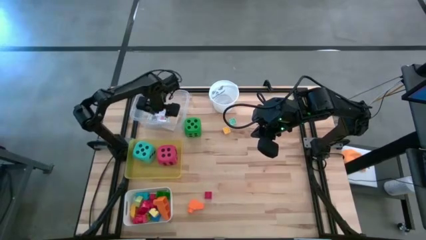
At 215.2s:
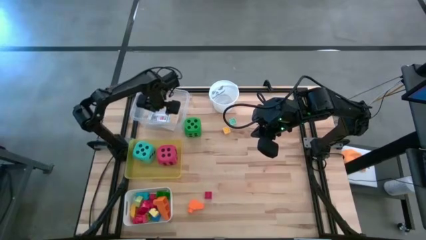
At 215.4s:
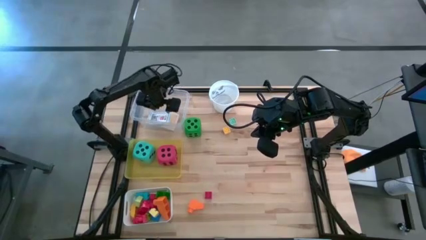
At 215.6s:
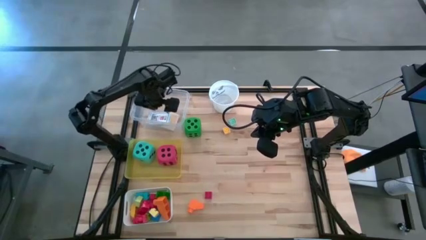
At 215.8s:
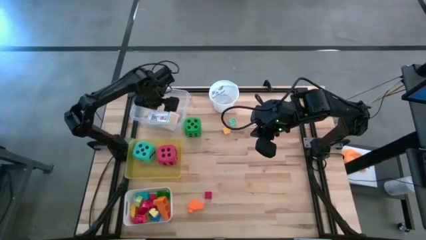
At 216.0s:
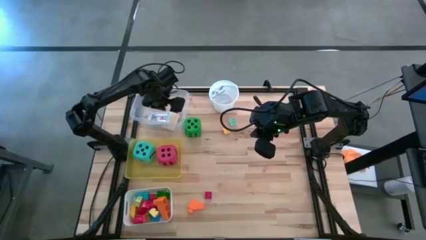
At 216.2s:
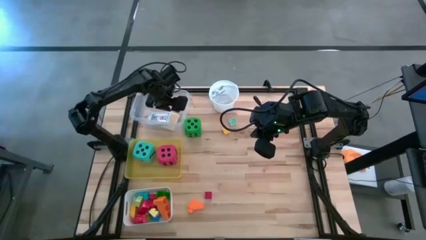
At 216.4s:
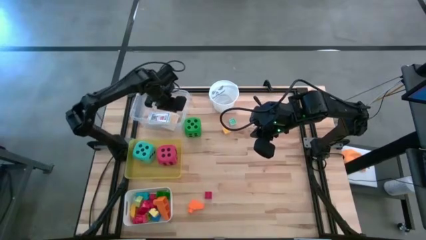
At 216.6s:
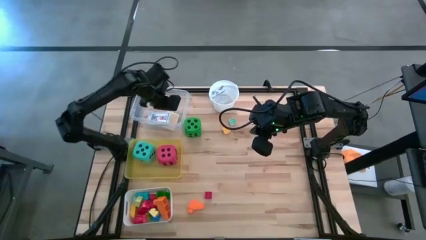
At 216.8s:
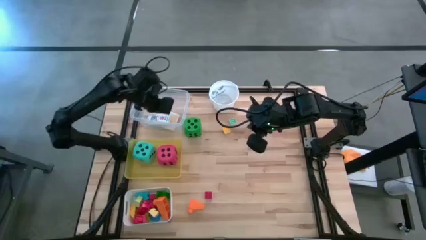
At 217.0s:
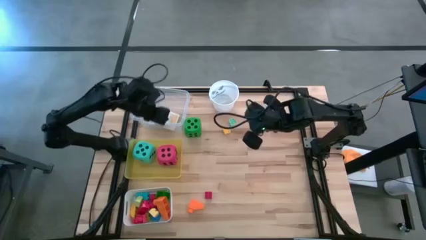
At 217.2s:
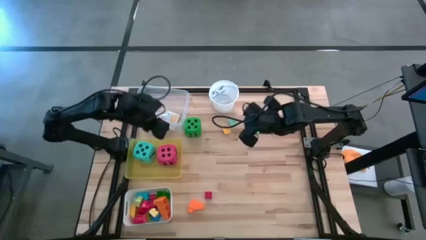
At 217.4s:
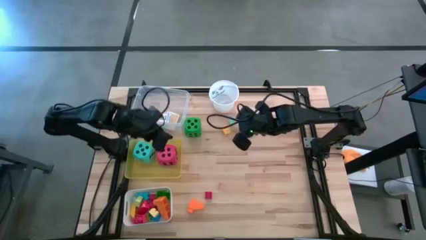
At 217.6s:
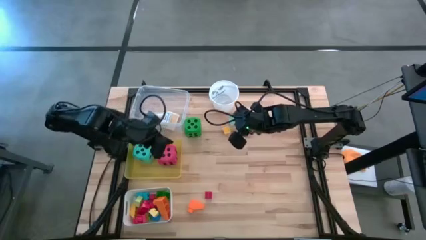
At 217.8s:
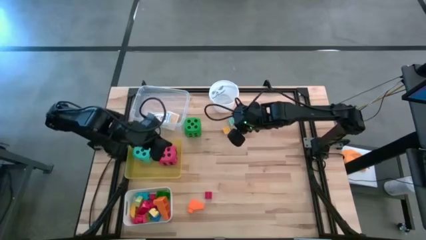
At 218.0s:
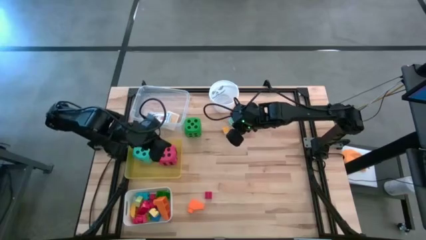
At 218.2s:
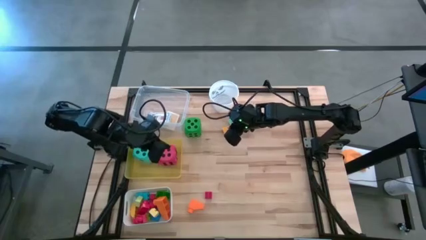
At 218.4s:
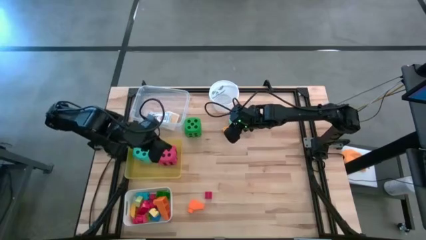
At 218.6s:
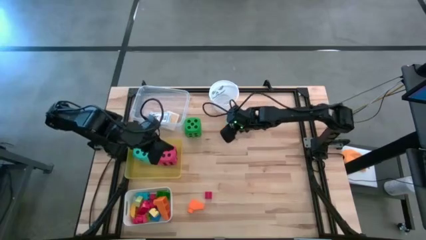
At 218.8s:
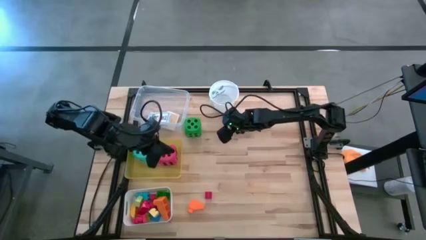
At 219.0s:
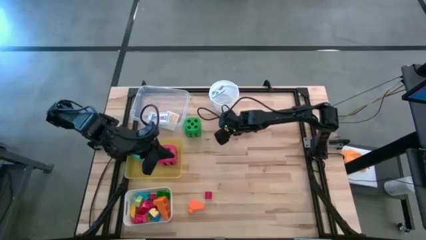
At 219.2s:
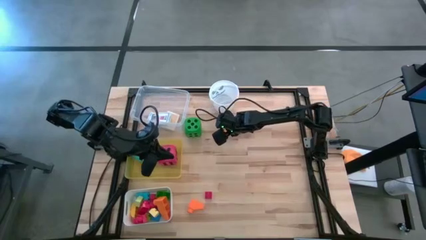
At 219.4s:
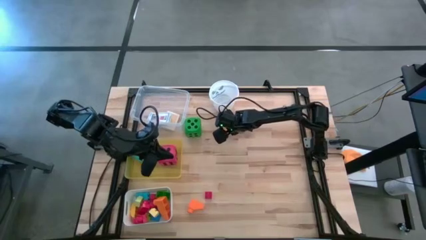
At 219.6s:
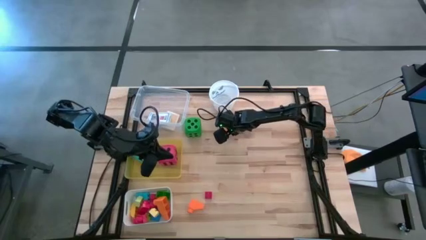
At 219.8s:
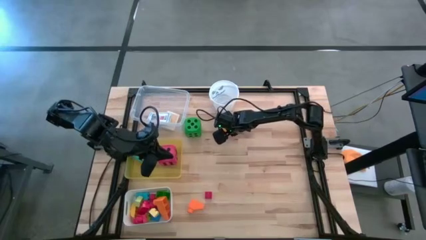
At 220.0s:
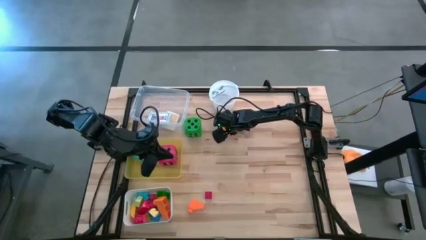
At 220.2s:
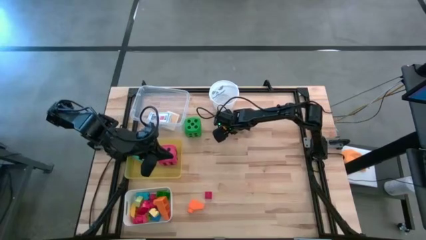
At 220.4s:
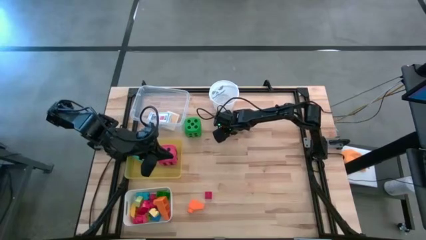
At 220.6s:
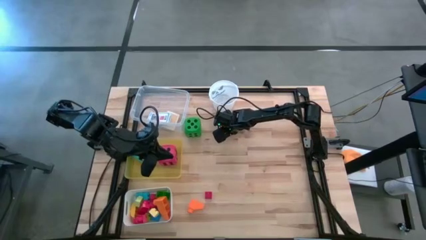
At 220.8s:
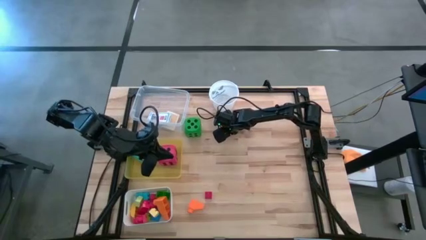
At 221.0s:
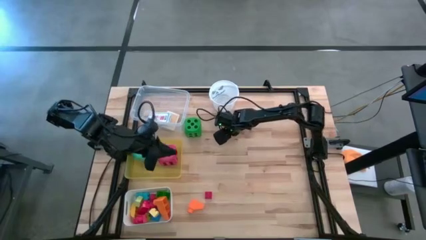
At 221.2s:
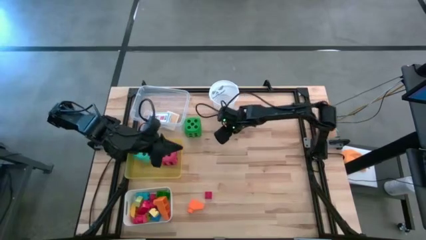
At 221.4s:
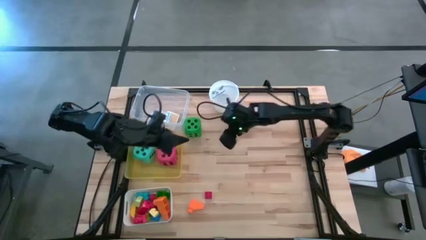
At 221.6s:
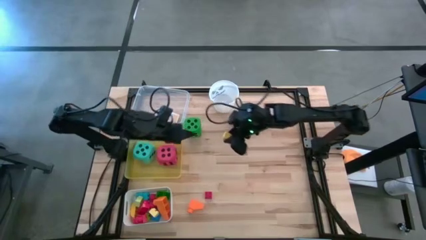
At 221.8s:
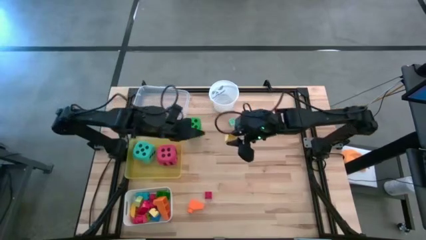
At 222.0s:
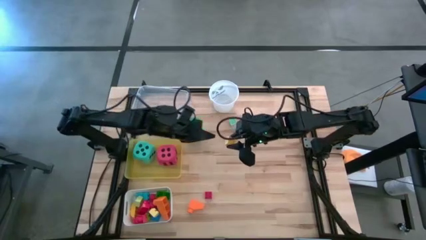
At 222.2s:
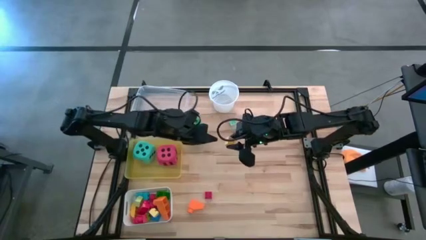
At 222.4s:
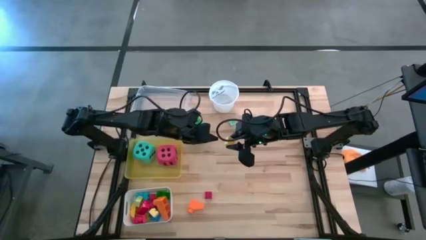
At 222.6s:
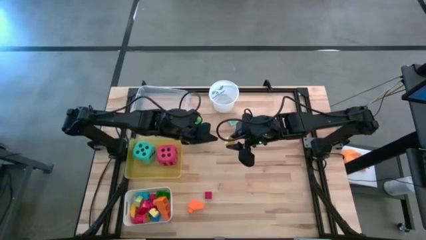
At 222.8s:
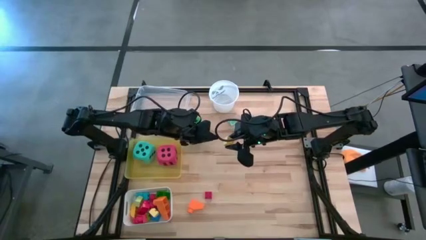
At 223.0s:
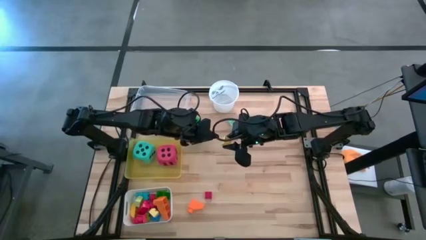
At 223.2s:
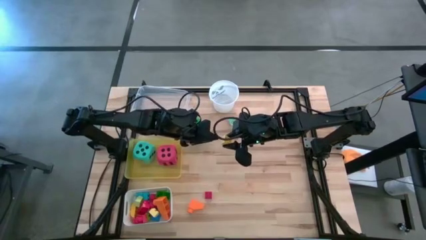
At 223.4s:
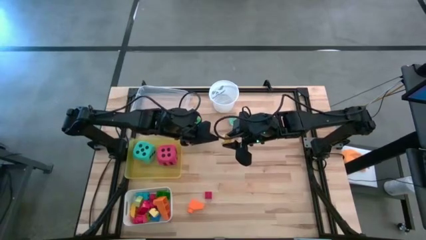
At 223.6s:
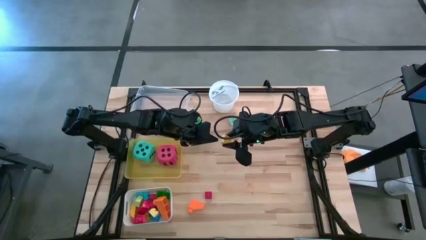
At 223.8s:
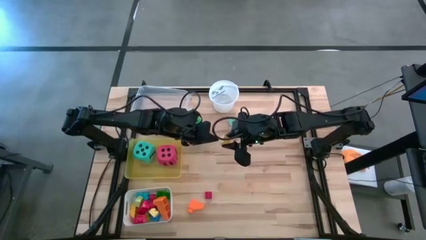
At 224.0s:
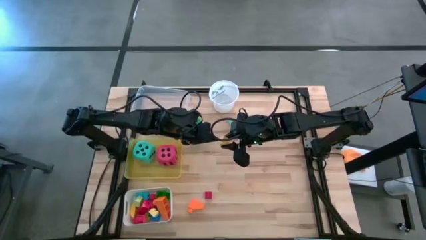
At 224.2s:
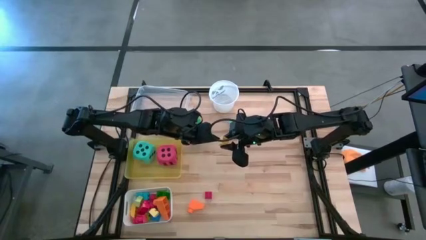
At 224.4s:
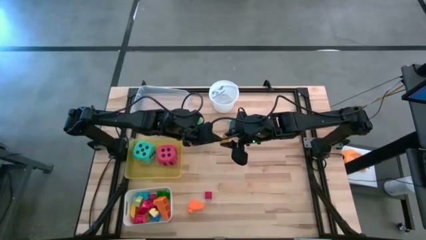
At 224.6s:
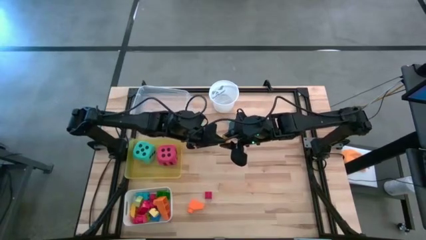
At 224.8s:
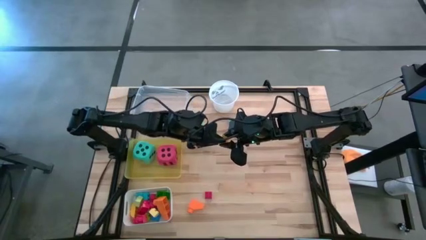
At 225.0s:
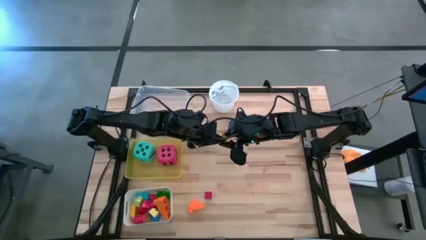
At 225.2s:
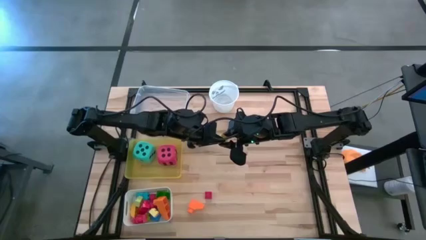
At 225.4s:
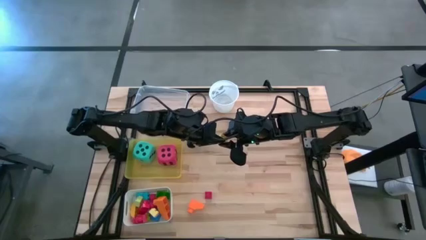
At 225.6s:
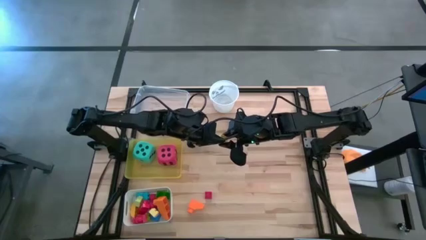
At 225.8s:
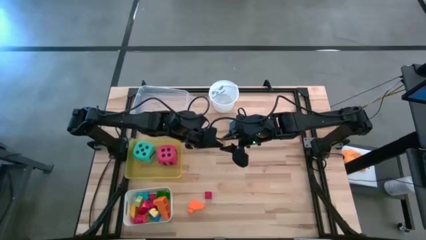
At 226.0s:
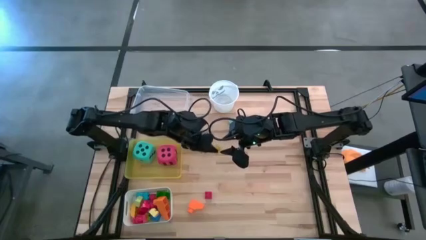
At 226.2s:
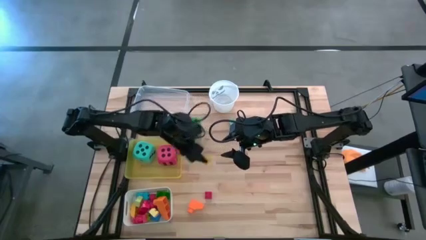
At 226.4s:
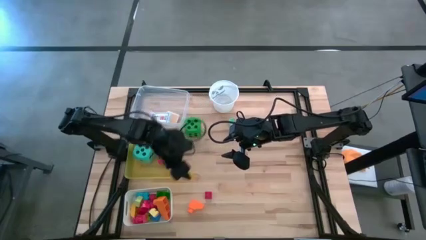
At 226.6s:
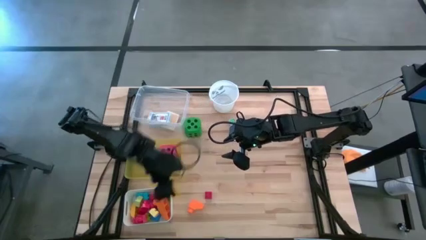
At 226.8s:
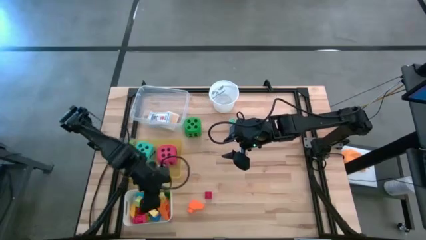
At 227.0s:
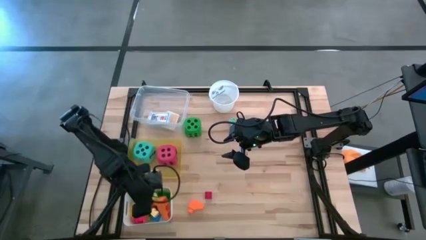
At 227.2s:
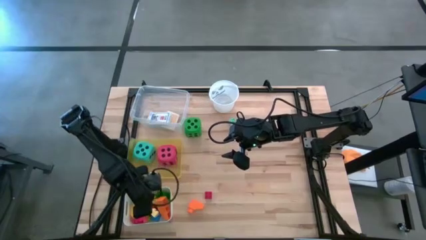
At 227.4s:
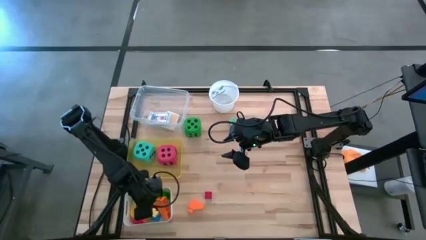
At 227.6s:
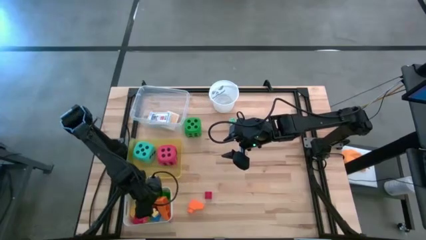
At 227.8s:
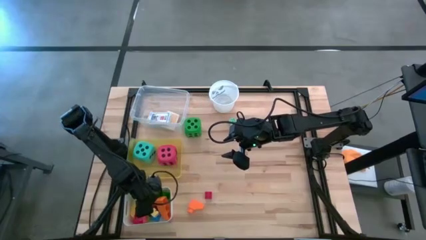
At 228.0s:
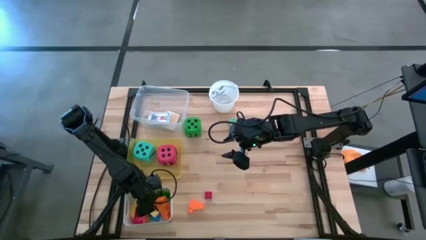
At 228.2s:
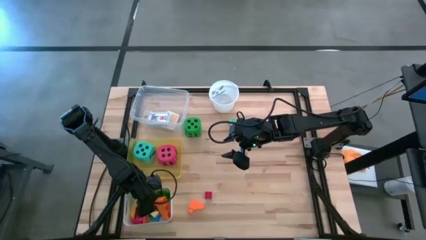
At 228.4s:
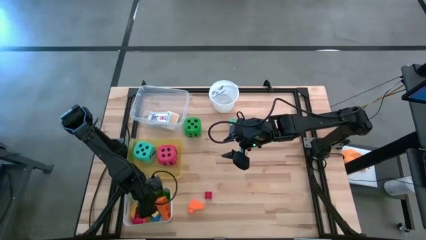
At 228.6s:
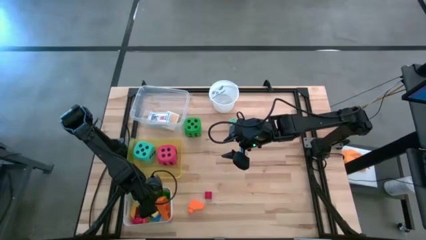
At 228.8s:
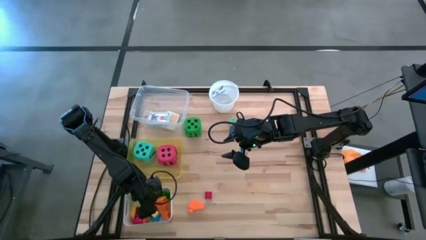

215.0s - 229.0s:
Task: Pick & Place Toys
Put the yellow game piece into the white bin

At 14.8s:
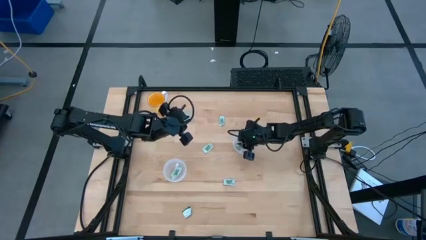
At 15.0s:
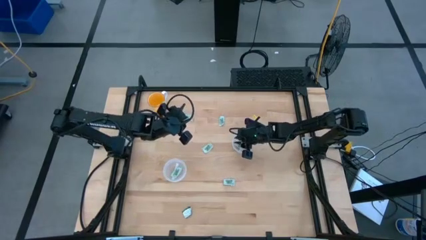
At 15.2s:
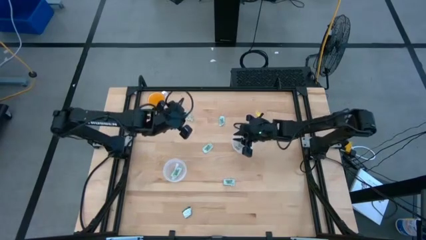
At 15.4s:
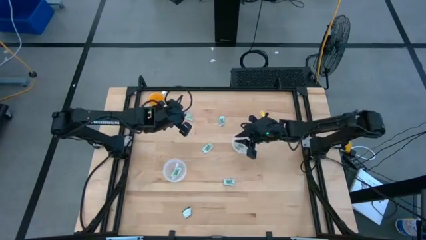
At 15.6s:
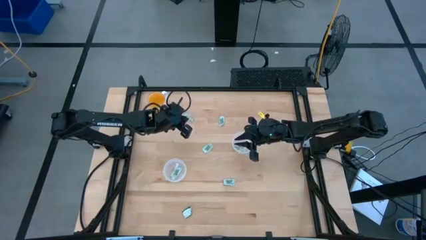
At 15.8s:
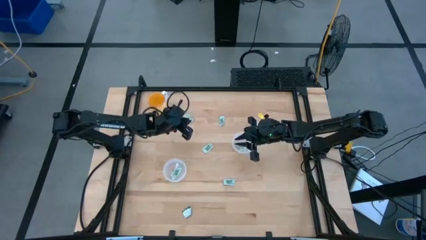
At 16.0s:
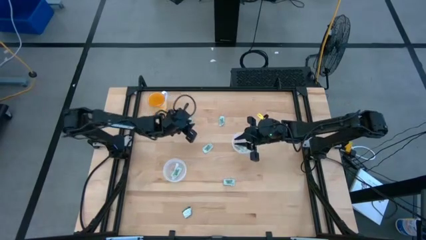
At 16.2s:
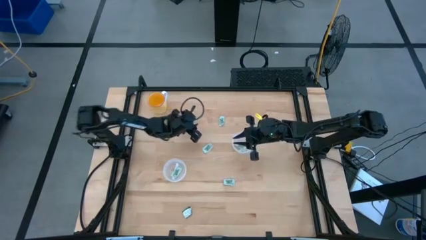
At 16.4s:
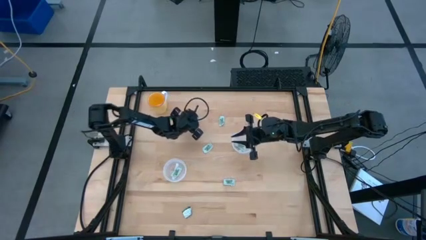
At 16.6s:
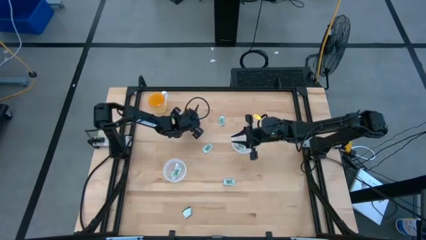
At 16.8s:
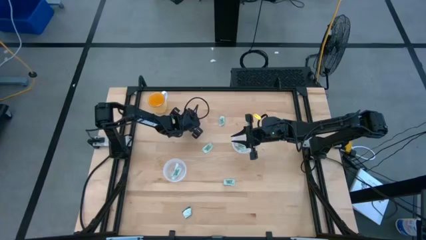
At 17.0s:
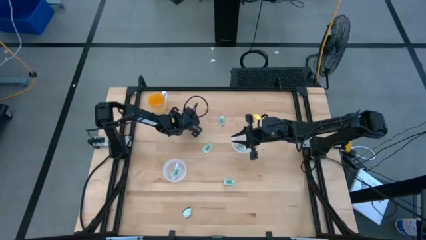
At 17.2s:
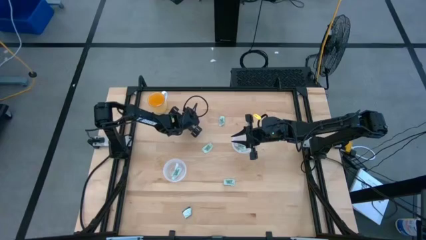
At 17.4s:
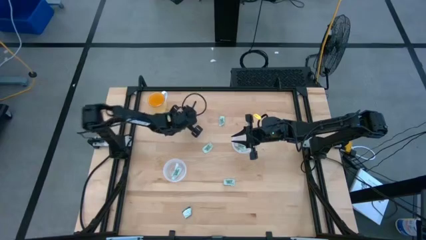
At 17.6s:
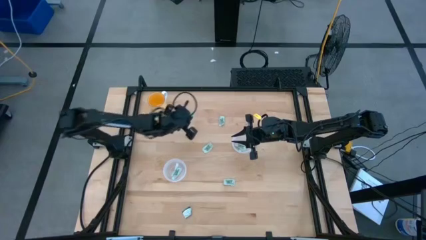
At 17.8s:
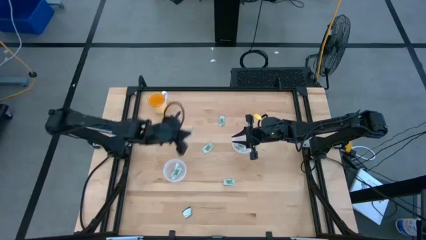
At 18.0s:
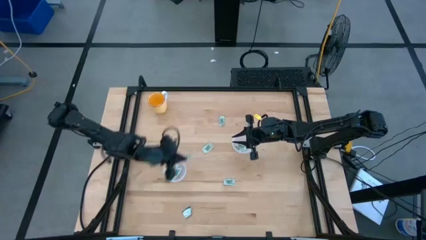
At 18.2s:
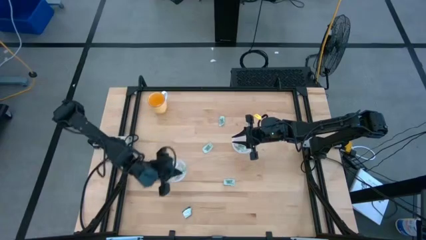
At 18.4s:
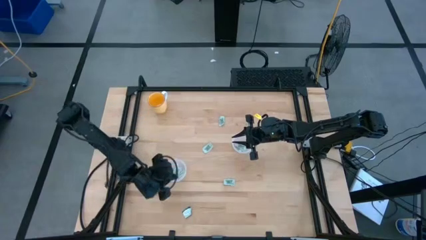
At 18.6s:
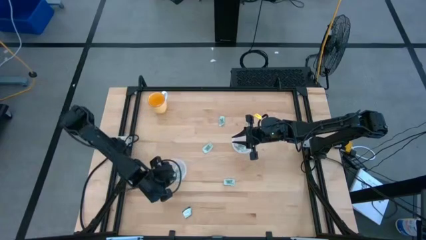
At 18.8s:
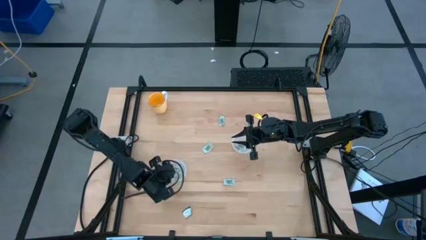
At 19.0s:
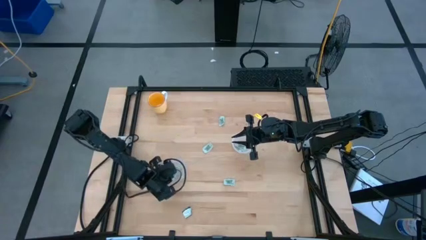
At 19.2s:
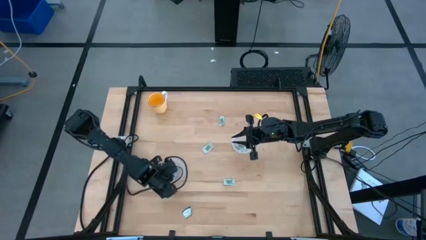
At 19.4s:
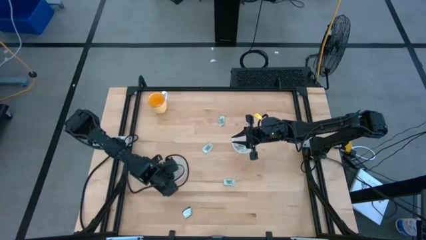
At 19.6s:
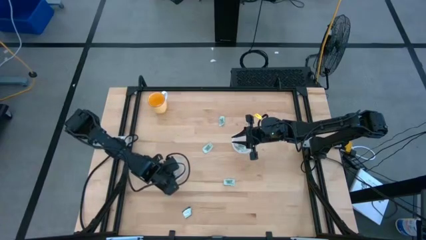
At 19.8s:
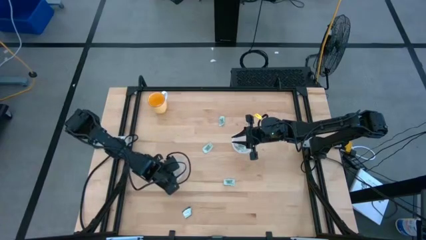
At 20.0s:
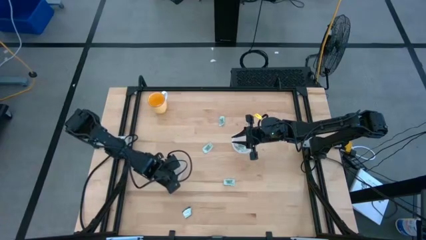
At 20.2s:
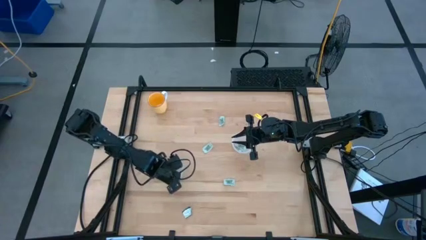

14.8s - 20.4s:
Task: Pick and place Stevia / Truvia into bins
Put the white stevia packet into the bottom transparent container
